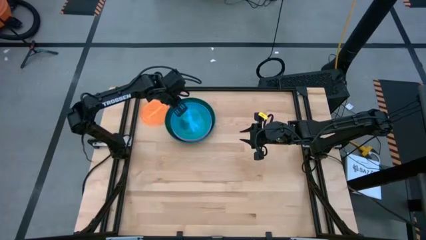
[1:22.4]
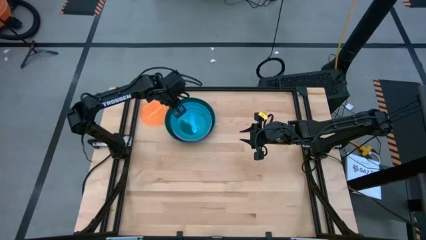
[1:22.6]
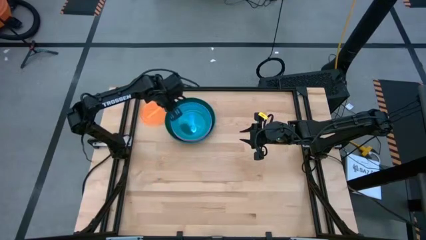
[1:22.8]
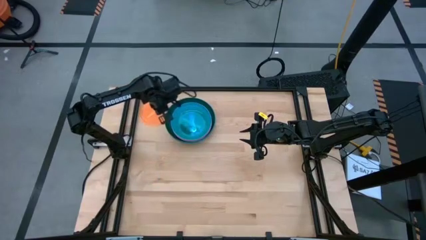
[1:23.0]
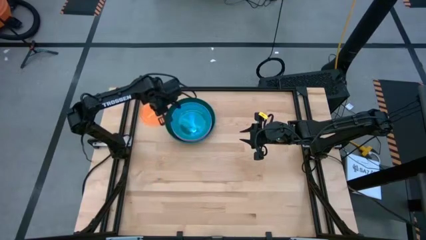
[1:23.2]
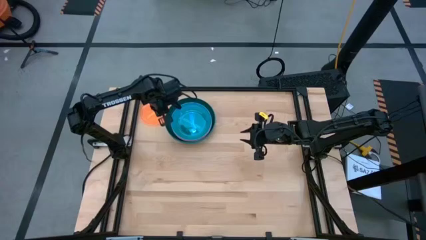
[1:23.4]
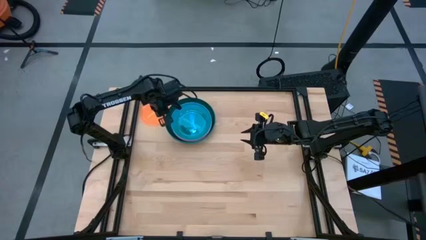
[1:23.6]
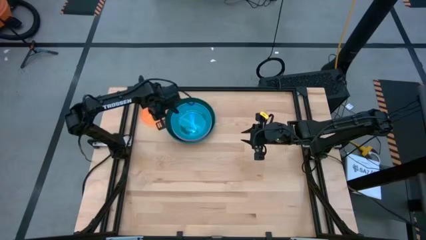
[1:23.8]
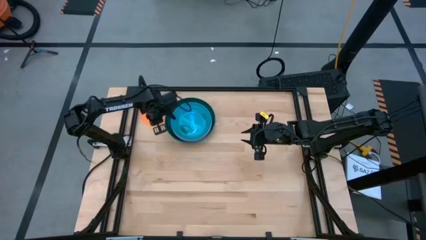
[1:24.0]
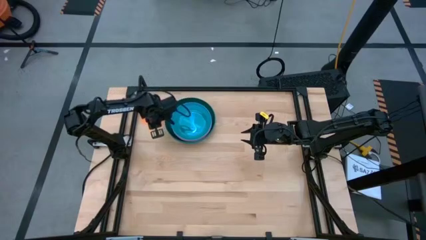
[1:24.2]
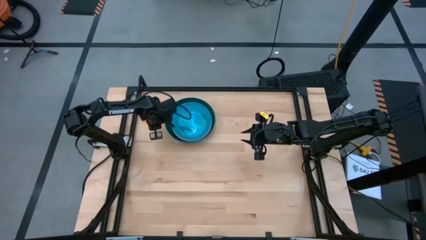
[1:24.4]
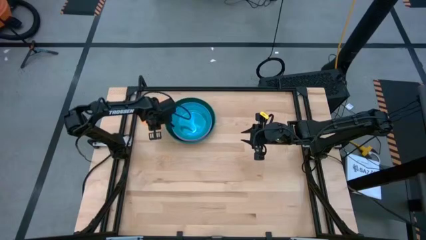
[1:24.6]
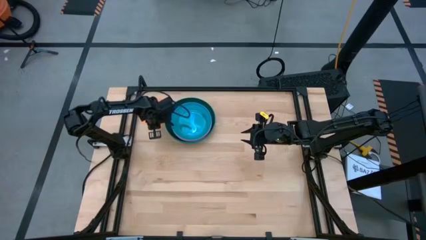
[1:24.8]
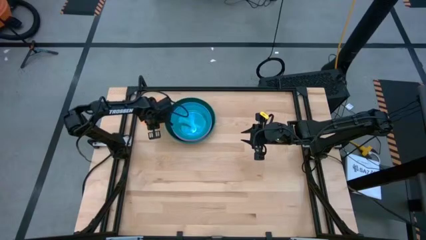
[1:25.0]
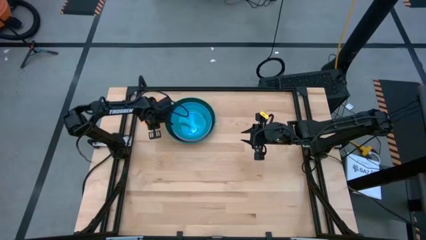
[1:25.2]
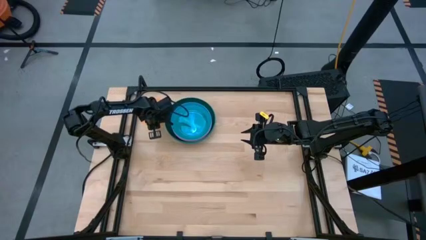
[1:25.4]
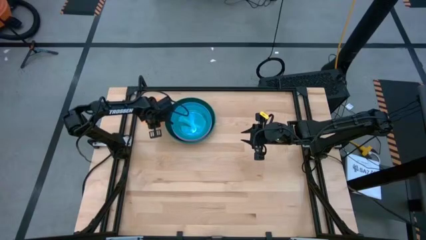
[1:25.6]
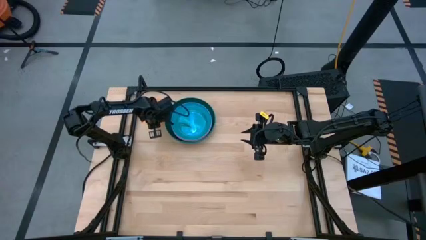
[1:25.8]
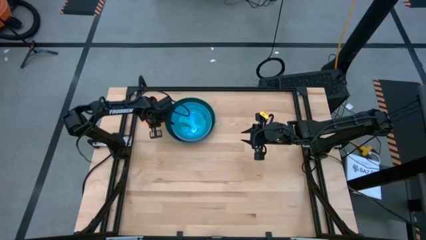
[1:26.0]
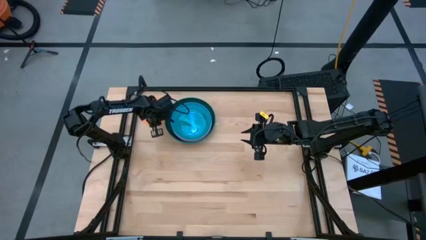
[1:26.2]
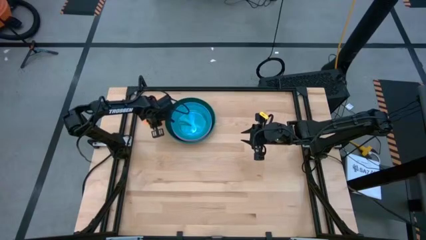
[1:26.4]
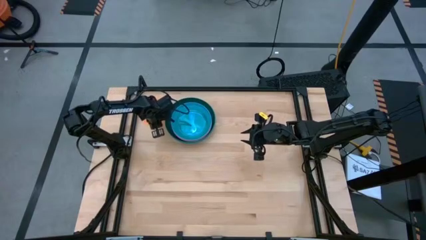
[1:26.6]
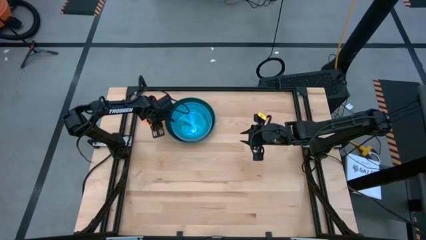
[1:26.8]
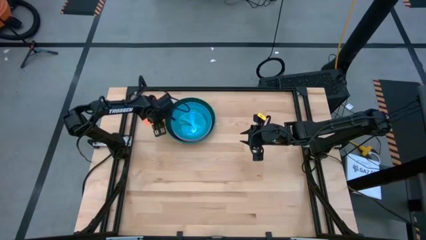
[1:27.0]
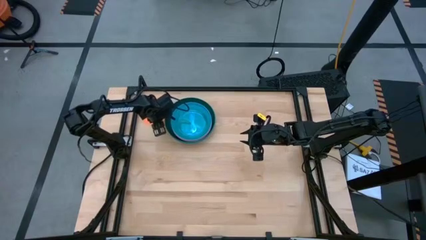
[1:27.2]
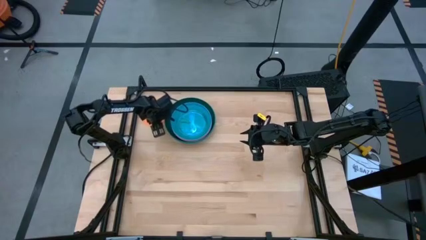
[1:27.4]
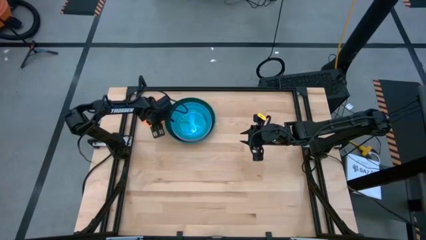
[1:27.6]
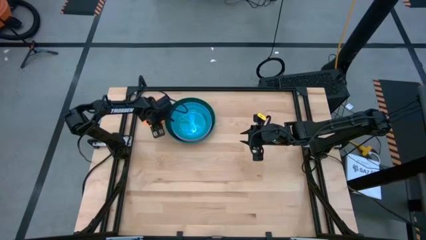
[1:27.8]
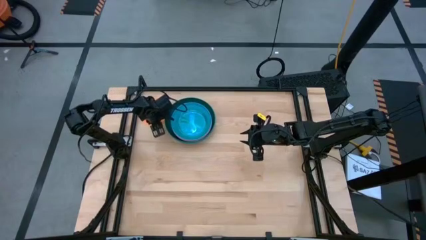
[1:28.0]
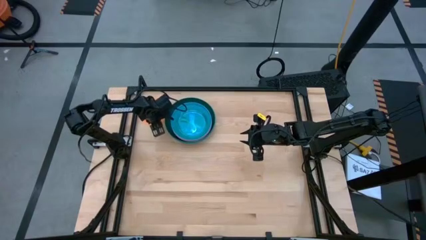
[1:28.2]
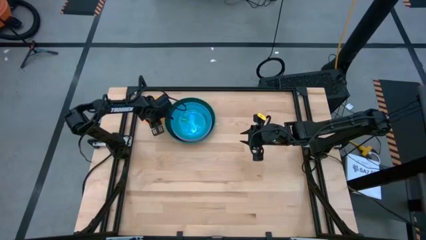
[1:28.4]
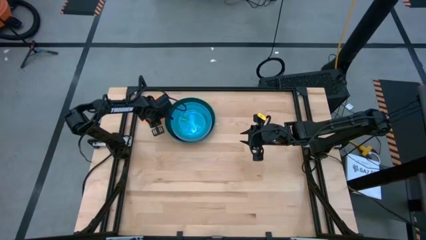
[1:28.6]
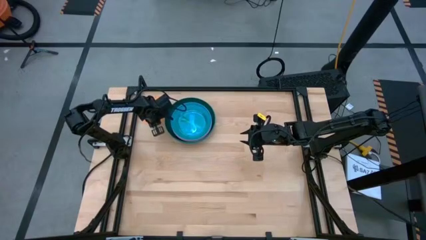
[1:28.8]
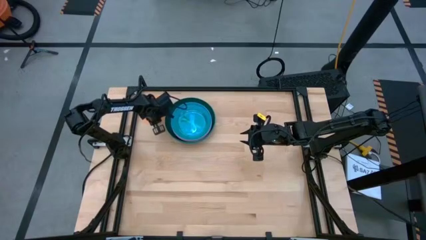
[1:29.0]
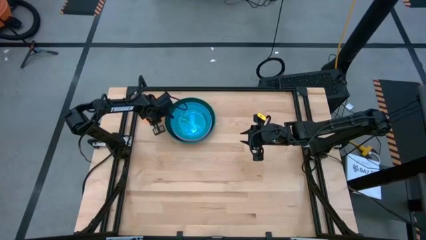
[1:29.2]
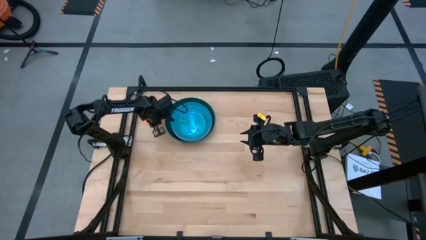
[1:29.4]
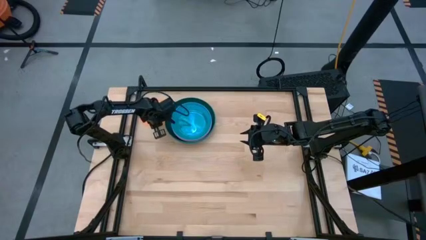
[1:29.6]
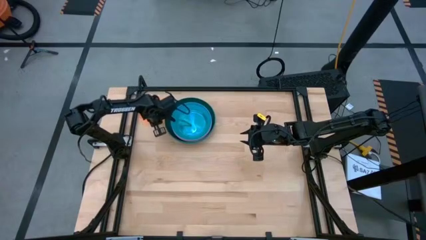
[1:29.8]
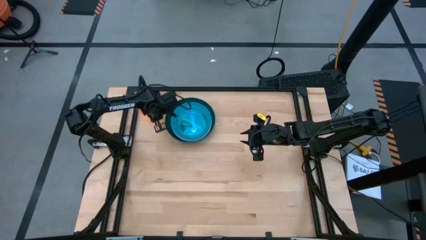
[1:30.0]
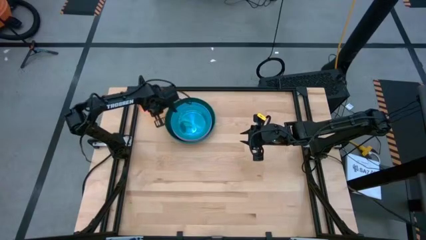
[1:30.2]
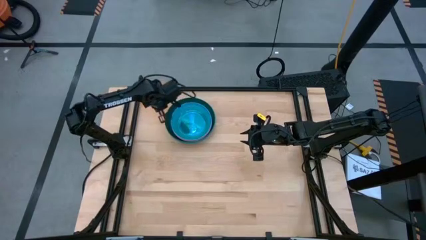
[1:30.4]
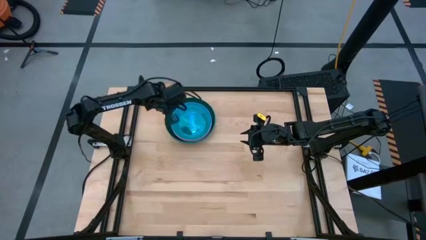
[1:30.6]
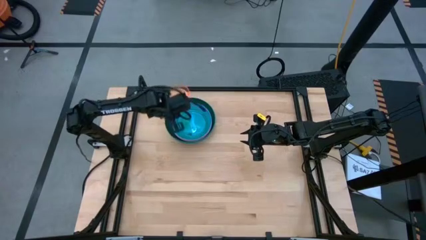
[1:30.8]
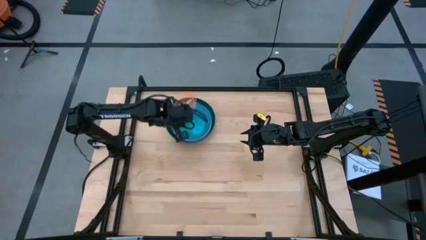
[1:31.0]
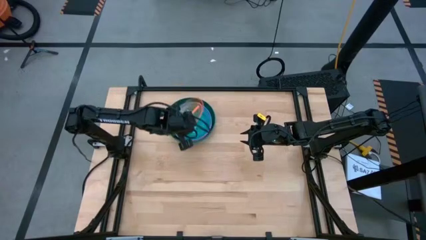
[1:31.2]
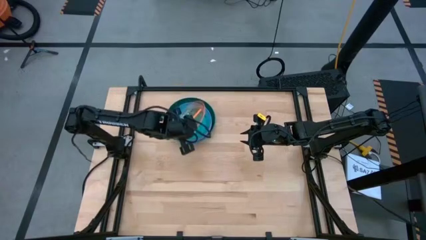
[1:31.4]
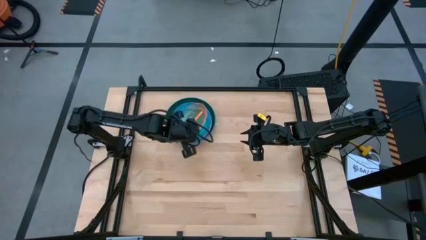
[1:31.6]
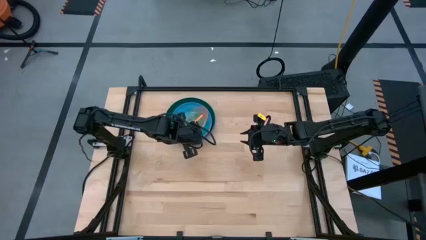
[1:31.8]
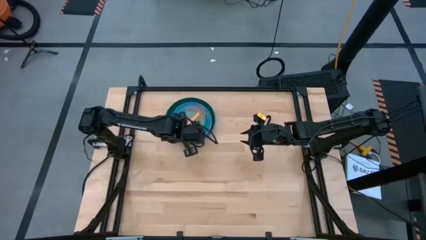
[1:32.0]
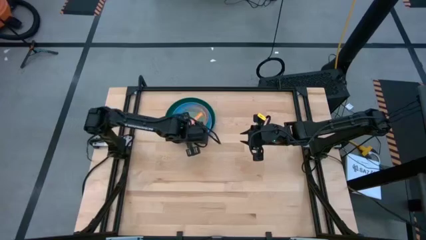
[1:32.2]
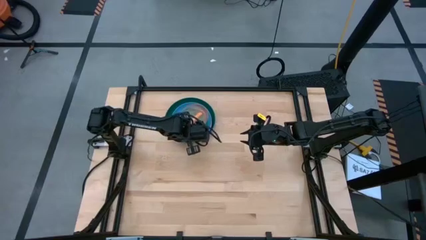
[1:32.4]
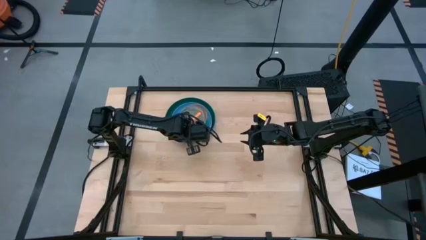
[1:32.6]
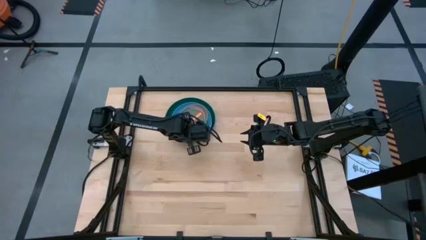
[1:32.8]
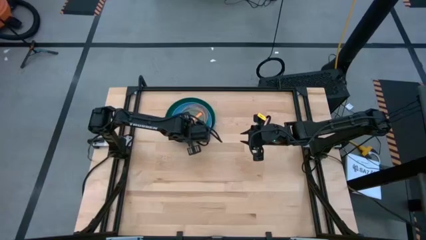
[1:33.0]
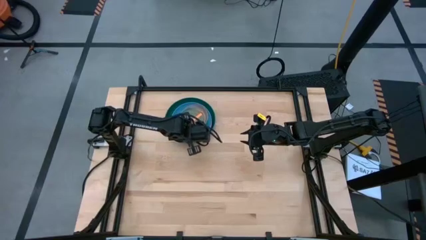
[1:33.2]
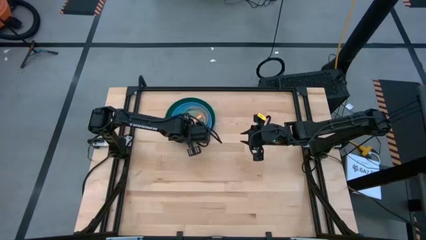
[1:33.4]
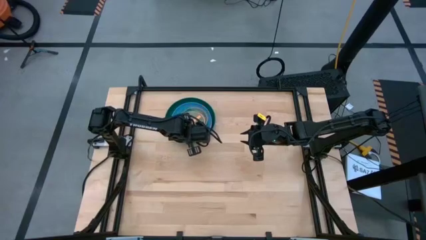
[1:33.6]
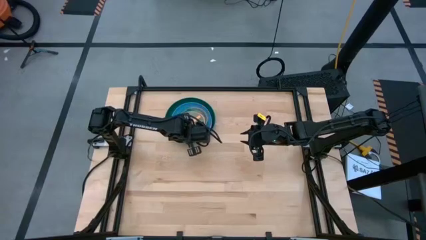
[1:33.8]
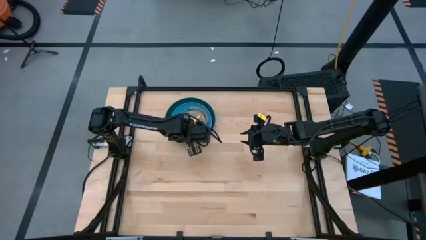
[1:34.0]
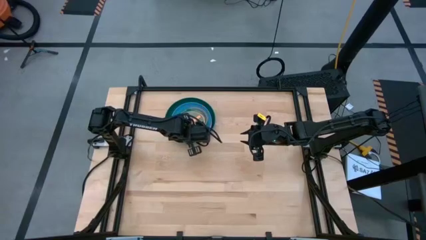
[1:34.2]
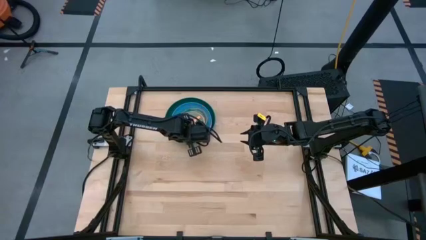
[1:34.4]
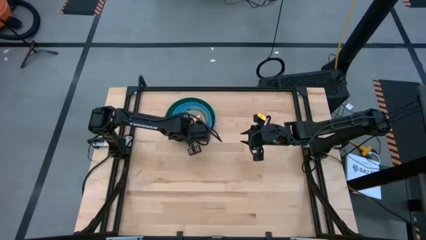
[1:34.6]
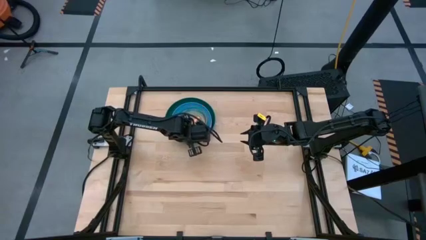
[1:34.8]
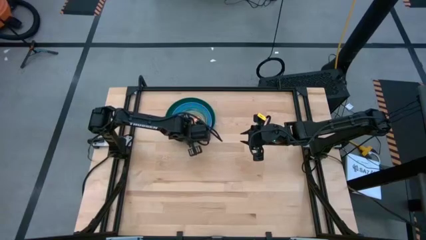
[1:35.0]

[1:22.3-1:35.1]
Task: Stack plastic plates
Stack the small orange plate on top of the small blue plate
